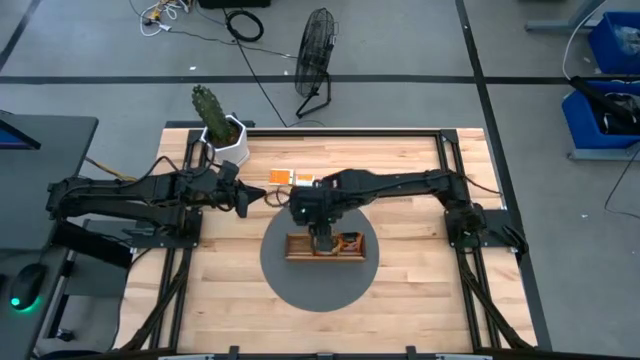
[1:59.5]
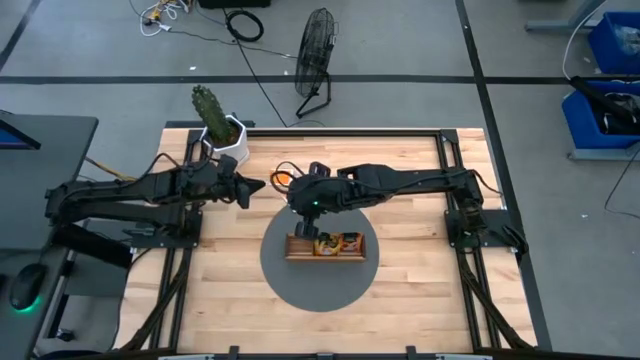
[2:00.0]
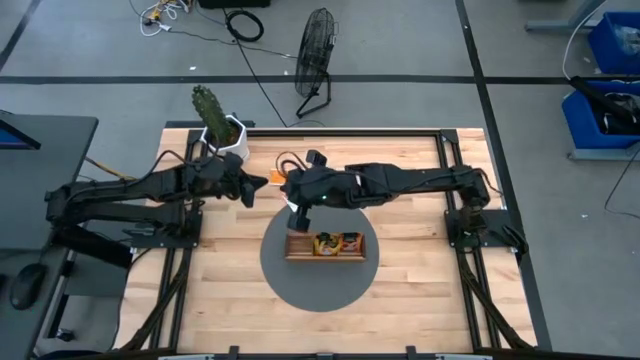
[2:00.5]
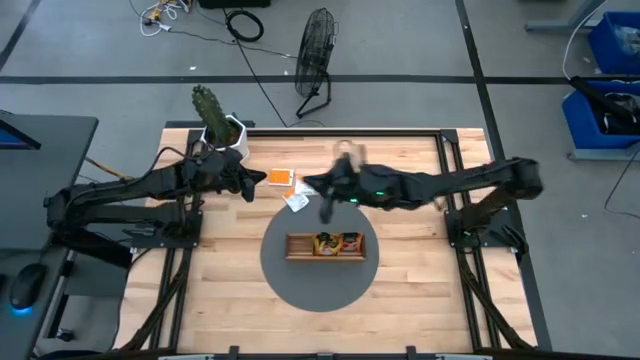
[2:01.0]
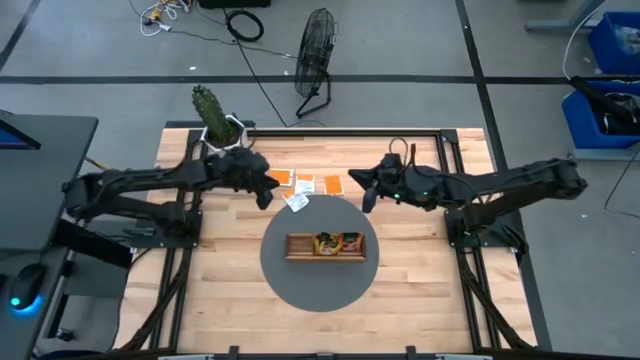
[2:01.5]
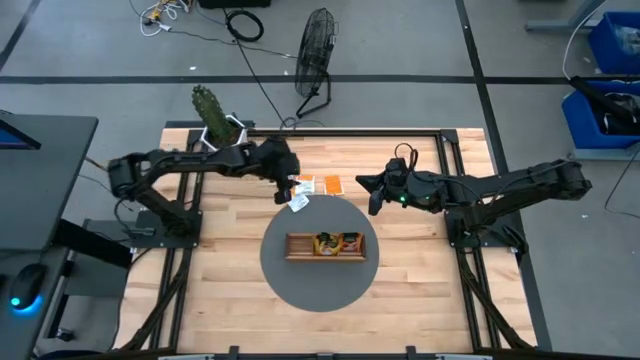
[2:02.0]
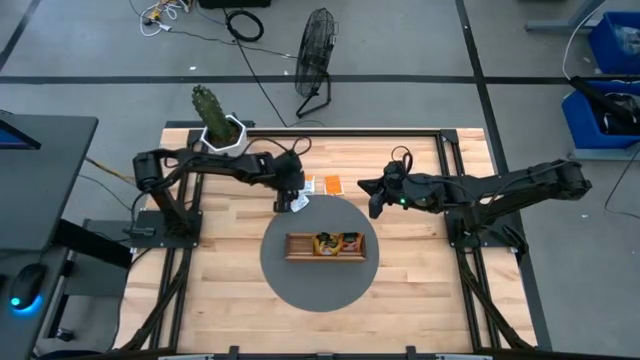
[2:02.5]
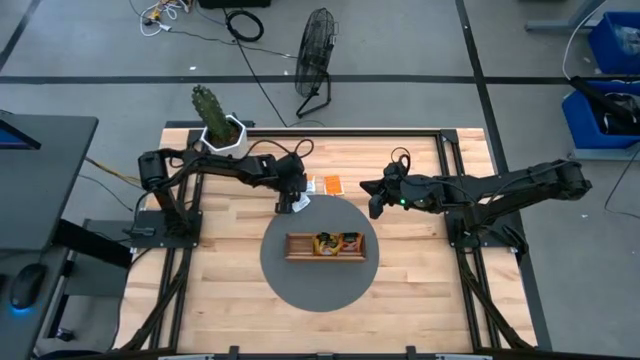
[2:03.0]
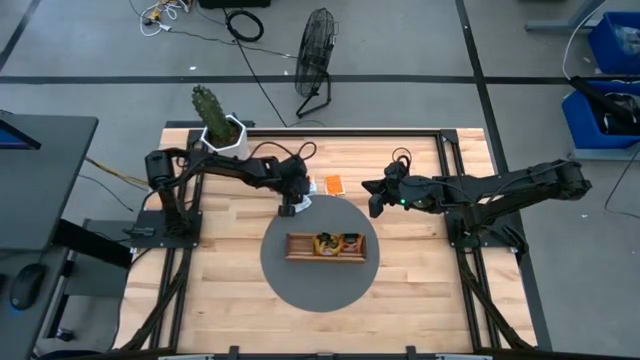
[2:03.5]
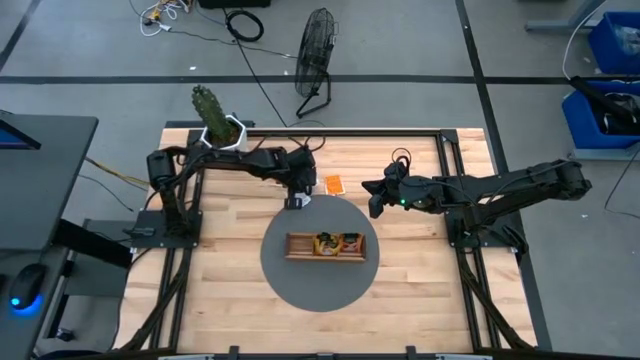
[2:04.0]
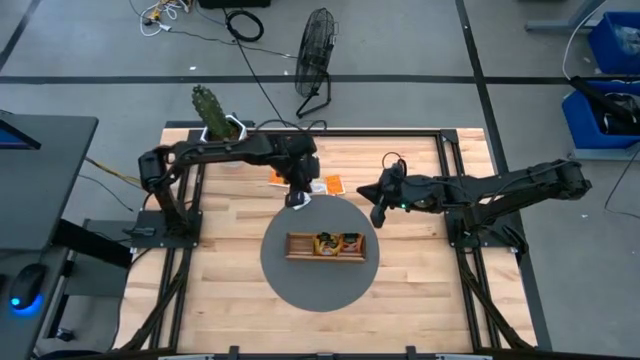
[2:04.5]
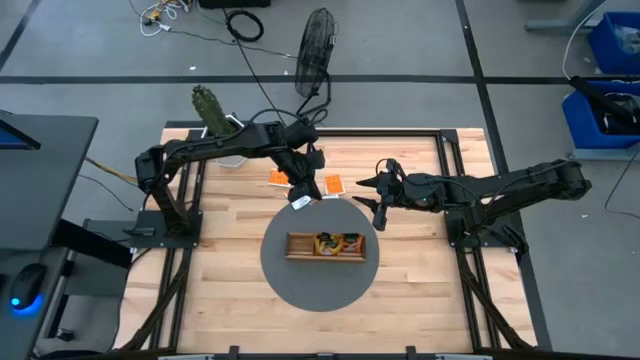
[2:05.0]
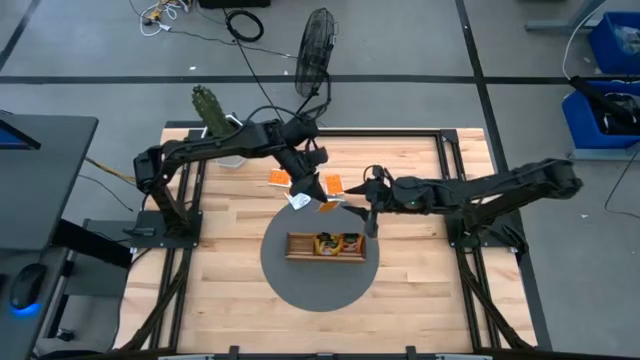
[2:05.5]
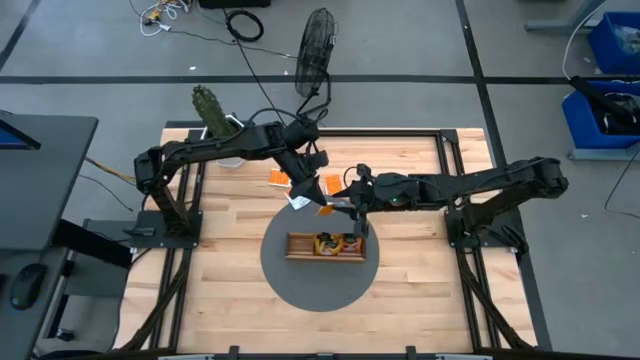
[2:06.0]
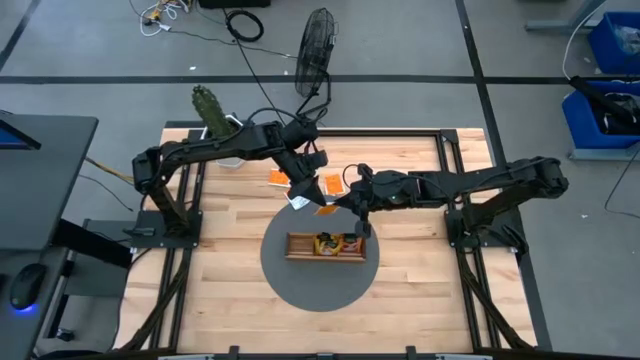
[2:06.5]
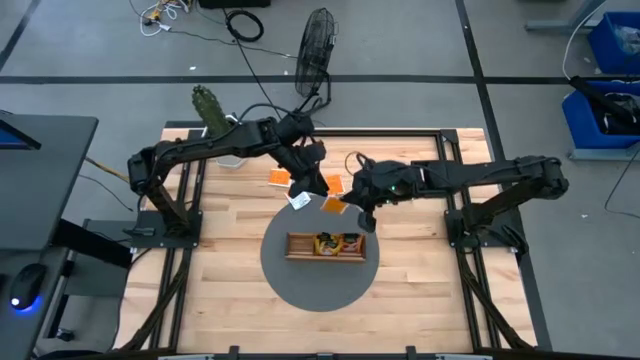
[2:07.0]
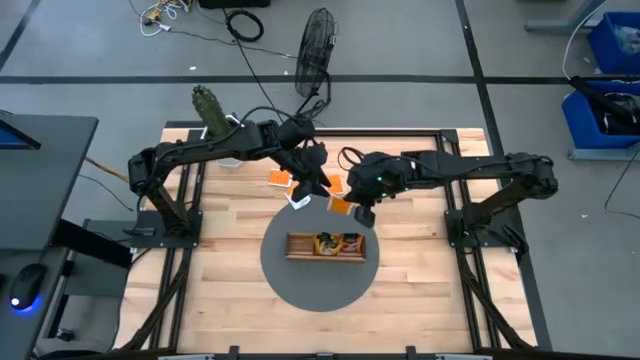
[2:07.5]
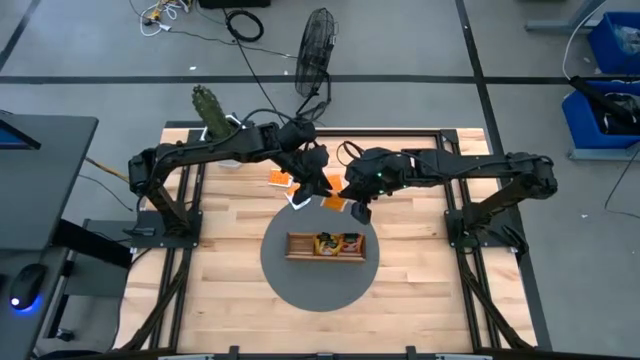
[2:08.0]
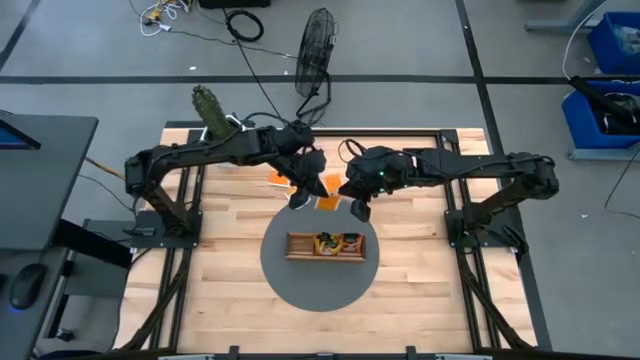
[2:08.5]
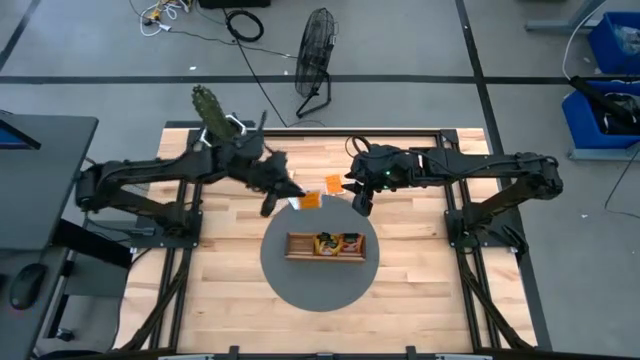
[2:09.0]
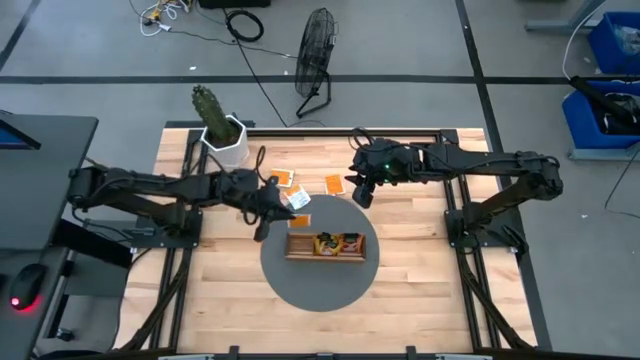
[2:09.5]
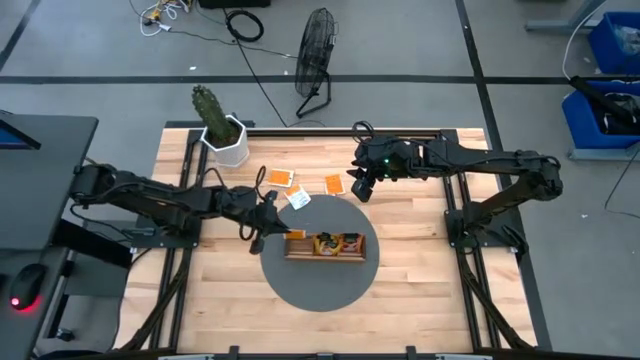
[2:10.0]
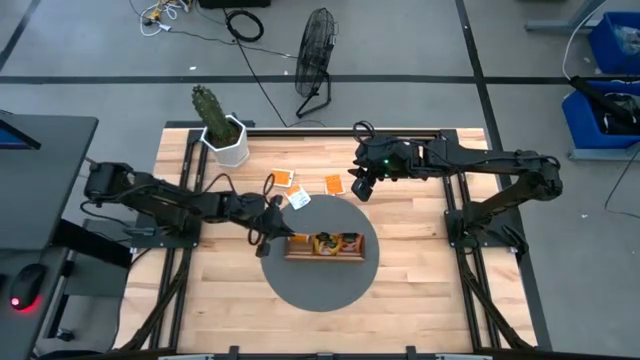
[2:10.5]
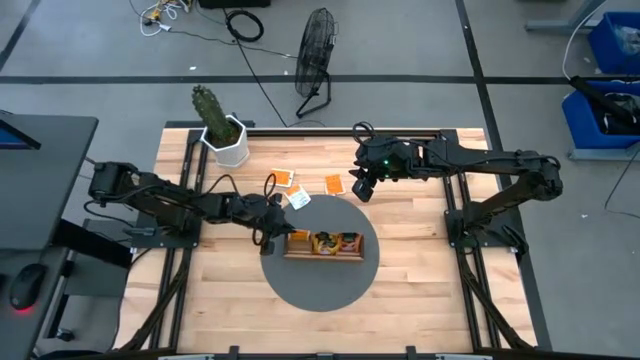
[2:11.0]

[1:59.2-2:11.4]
Task: Pick & Place Tea
Put the white orange tea bag into the left section of the wooden organizer

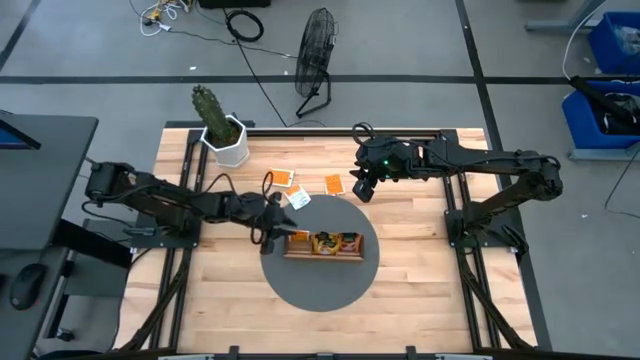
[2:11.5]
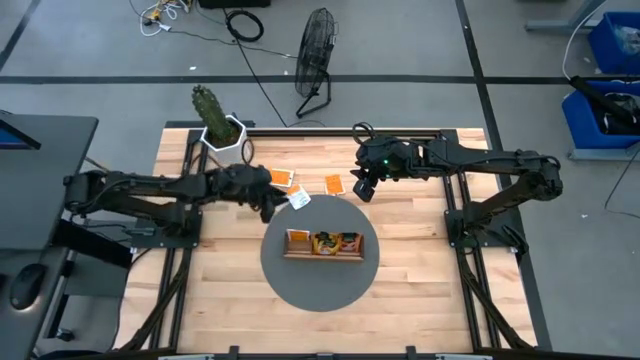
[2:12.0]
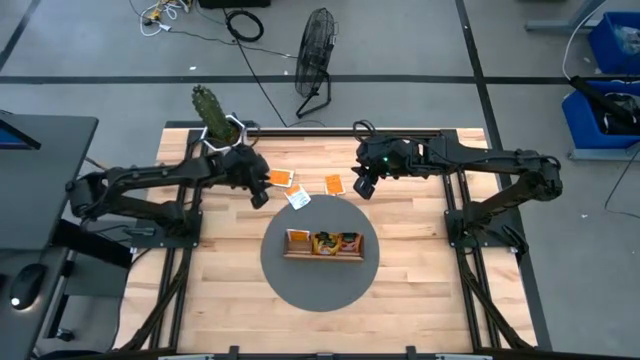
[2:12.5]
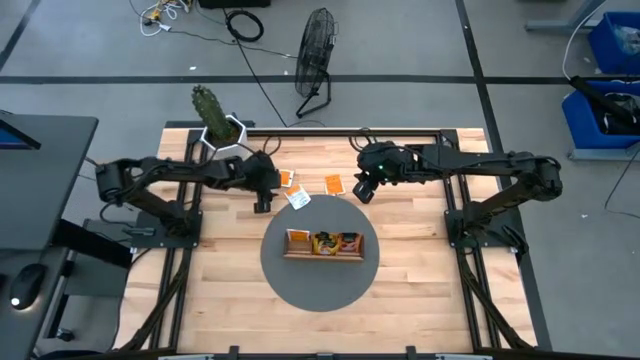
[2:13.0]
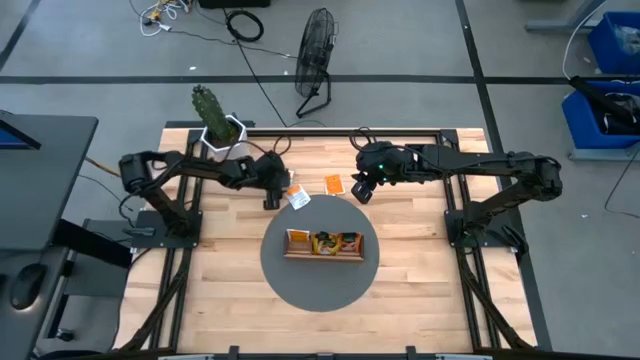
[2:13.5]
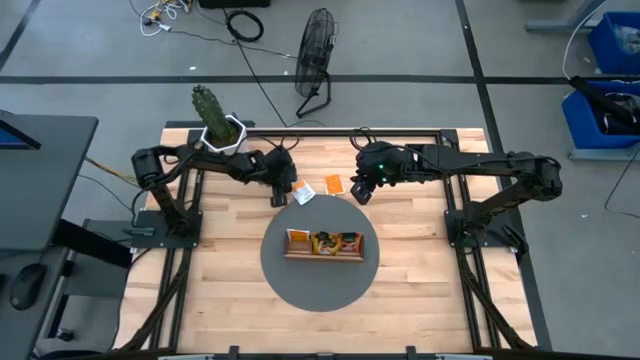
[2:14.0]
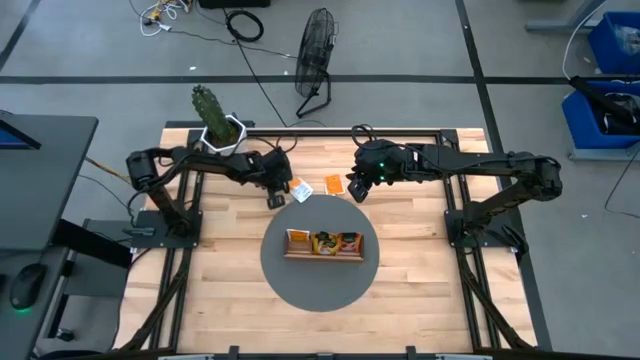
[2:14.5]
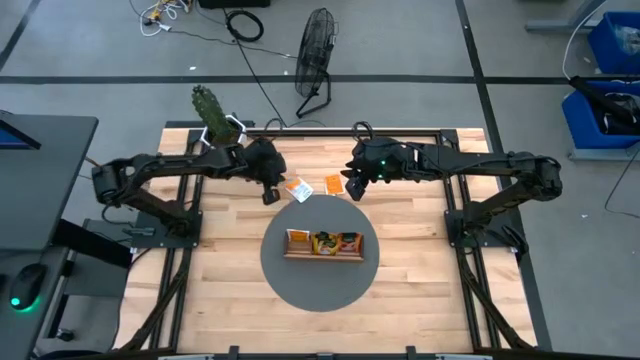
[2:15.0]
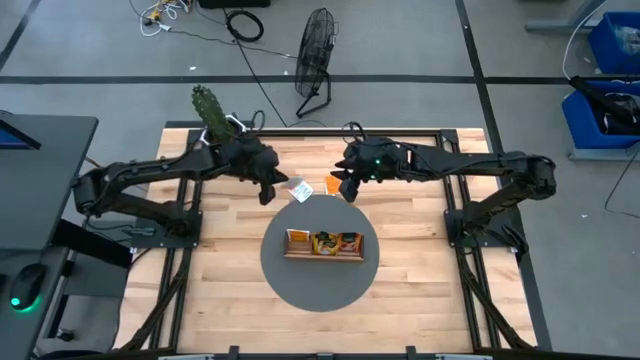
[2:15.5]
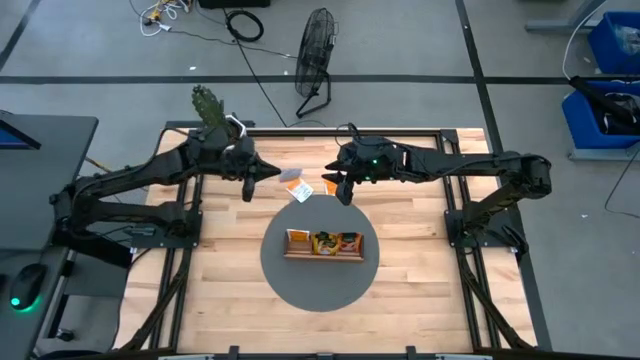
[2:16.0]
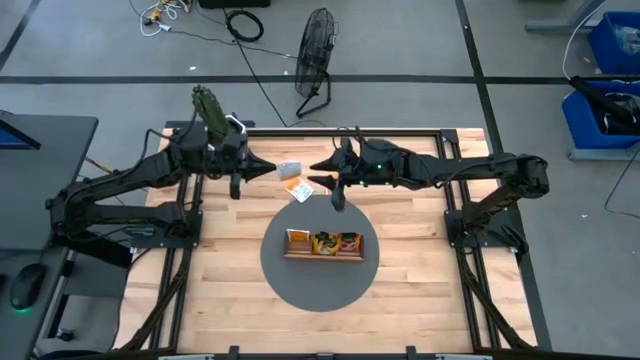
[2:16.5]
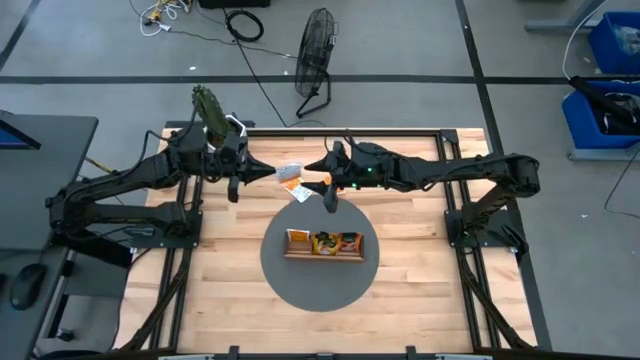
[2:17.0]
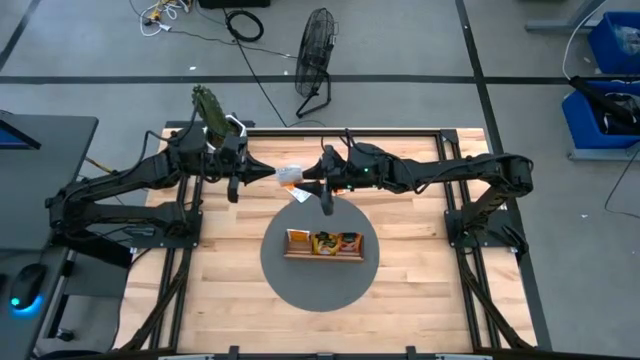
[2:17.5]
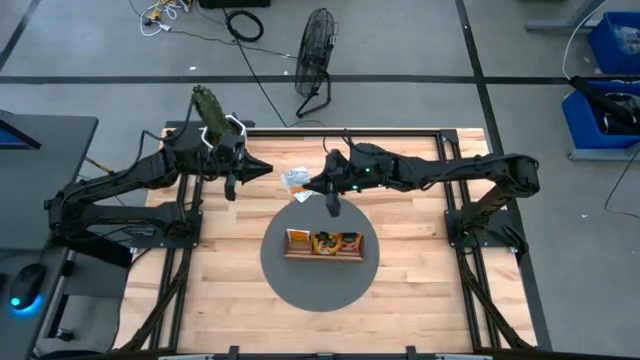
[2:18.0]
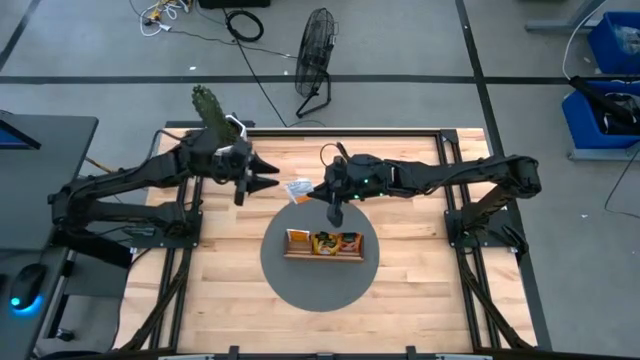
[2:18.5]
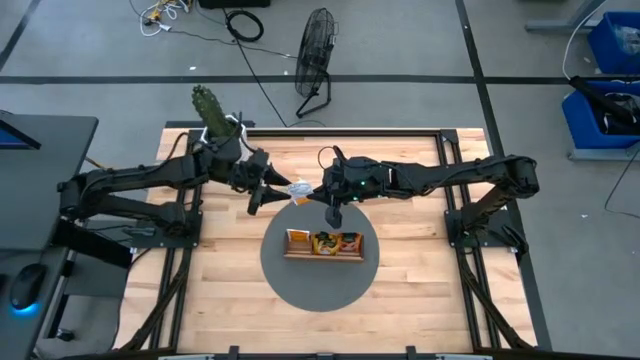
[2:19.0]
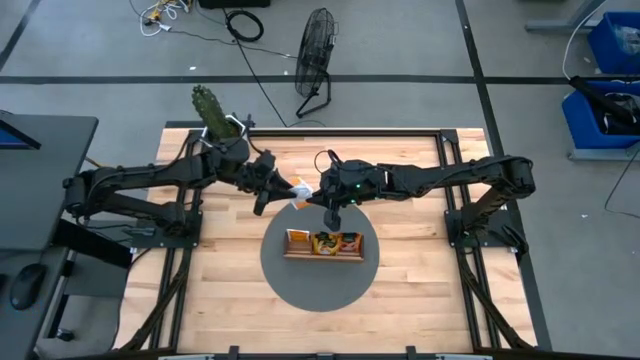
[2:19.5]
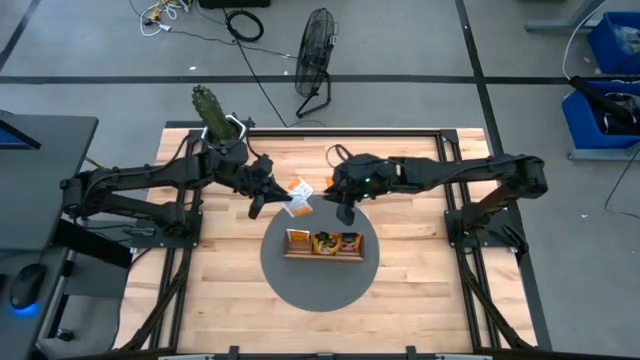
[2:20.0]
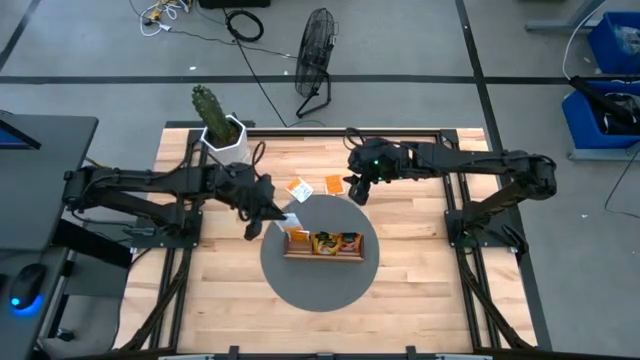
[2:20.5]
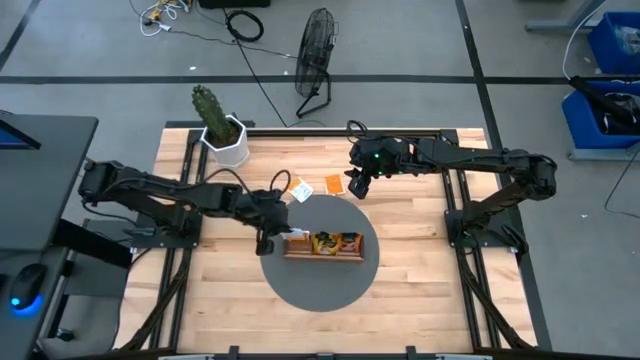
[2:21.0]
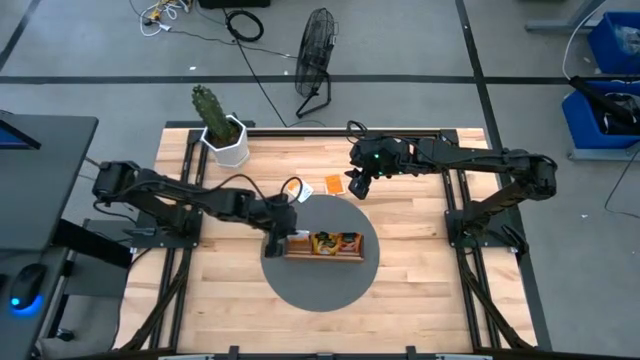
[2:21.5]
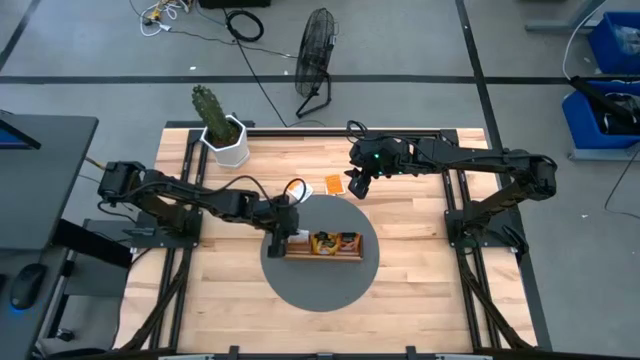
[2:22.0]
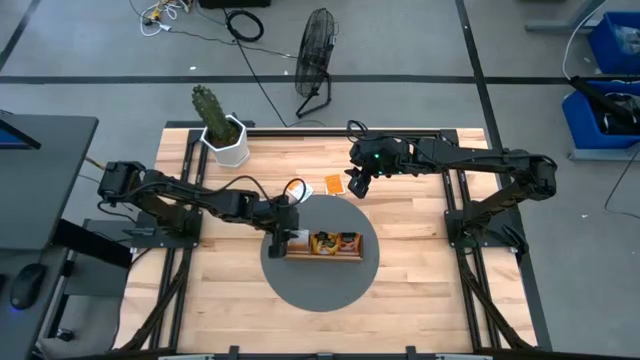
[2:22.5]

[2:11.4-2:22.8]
Put the white orange tea bag into the left section of the wooden organizer
